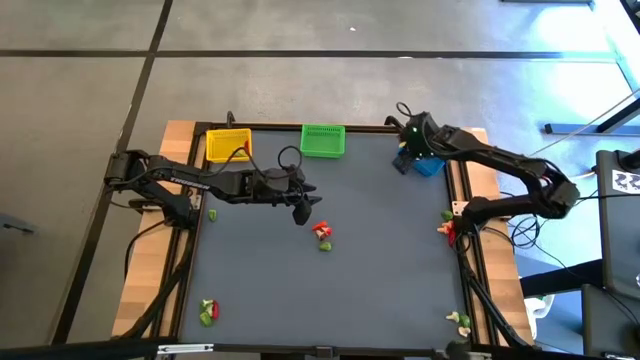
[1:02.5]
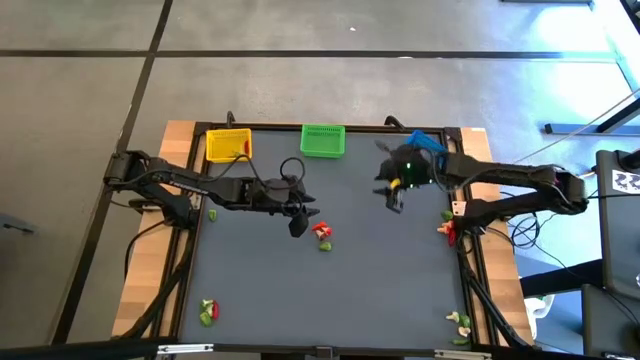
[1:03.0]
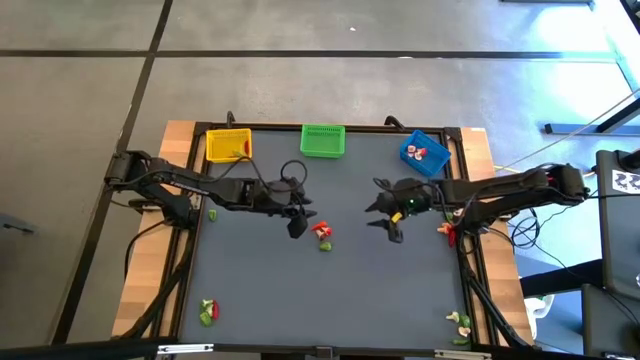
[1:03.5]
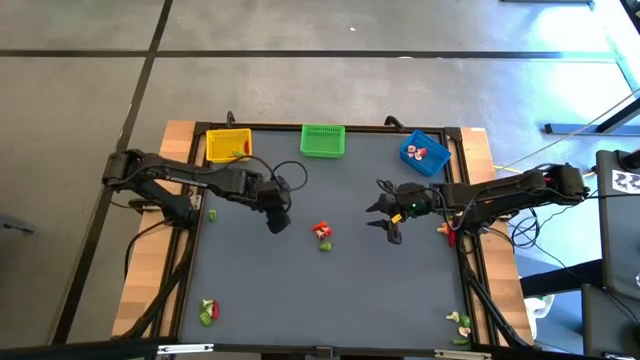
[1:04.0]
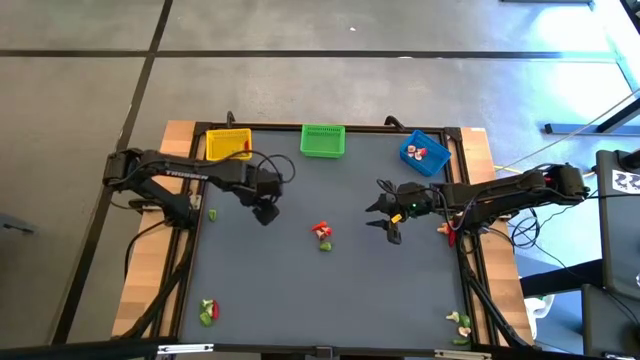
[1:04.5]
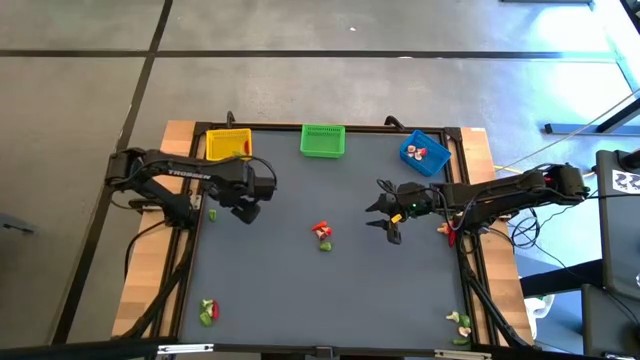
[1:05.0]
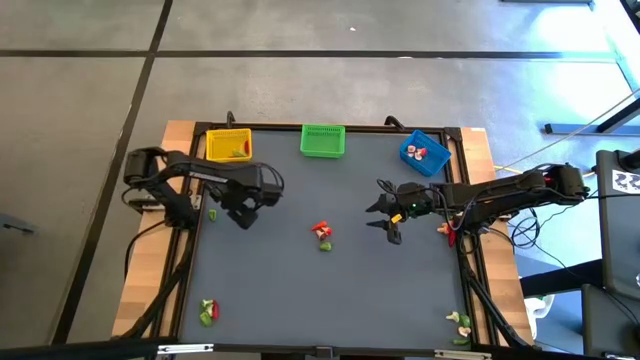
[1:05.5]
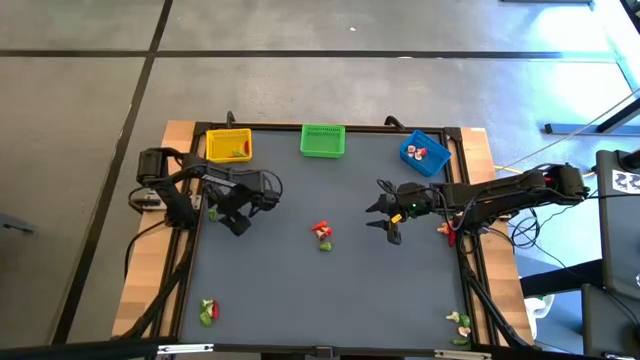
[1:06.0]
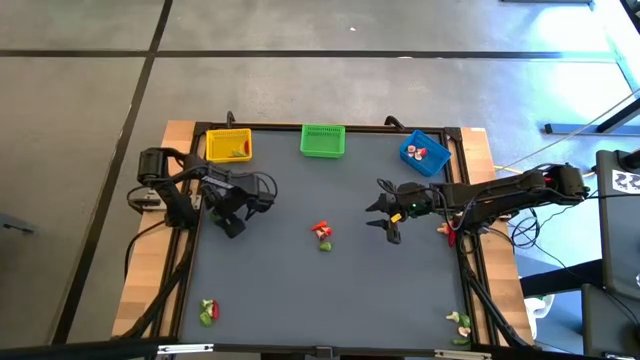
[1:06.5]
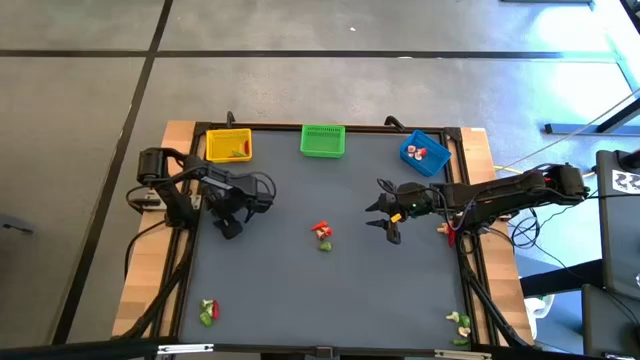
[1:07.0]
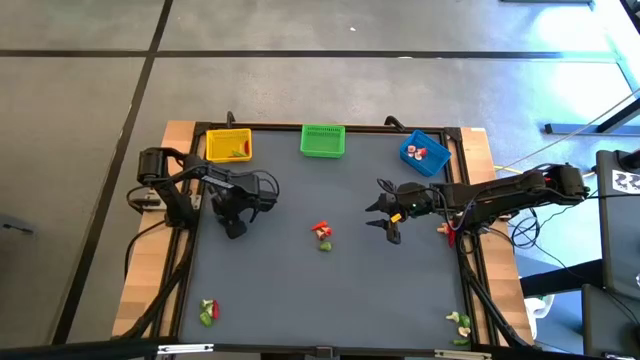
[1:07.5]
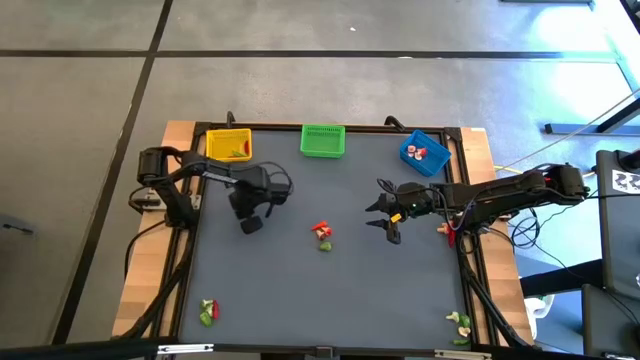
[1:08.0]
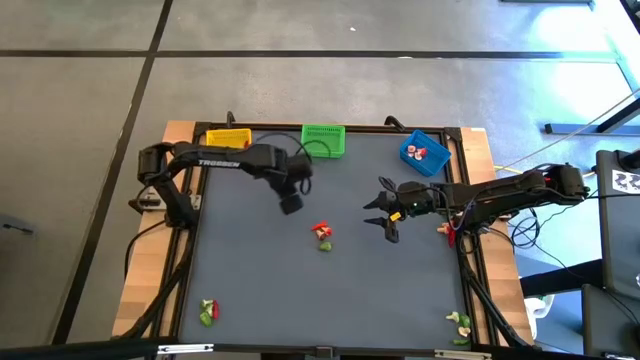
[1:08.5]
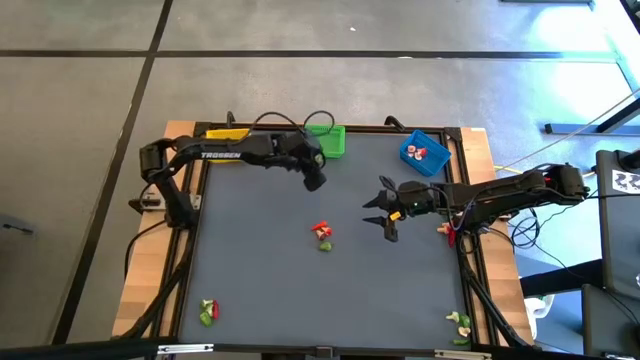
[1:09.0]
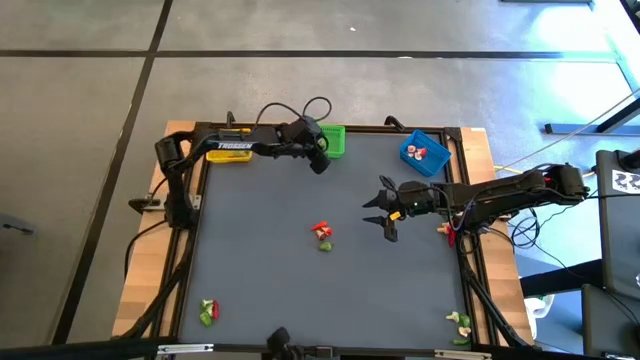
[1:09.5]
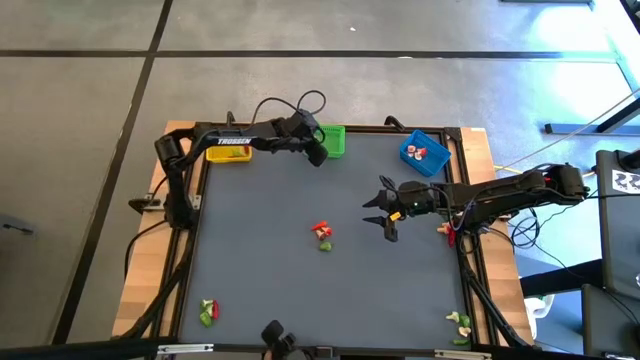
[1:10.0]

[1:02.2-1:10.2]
Task: Sort produce into baskets
Put the small green chili pepper into the green basket

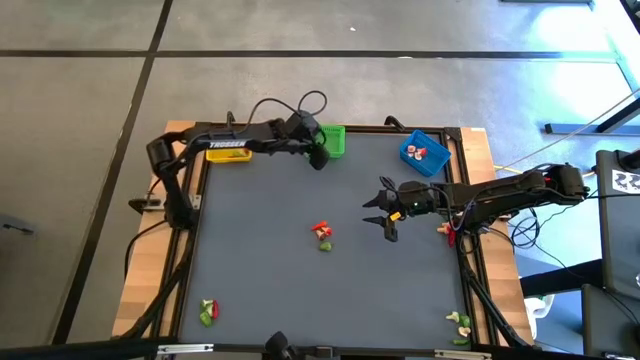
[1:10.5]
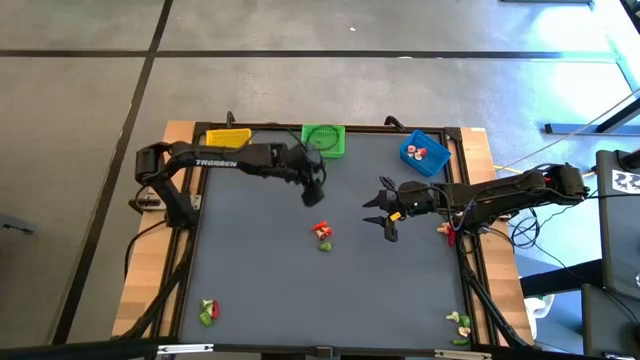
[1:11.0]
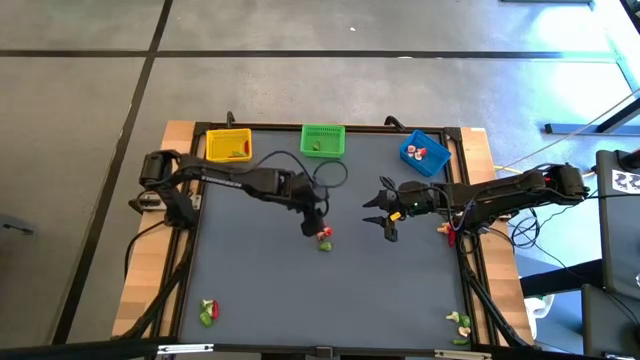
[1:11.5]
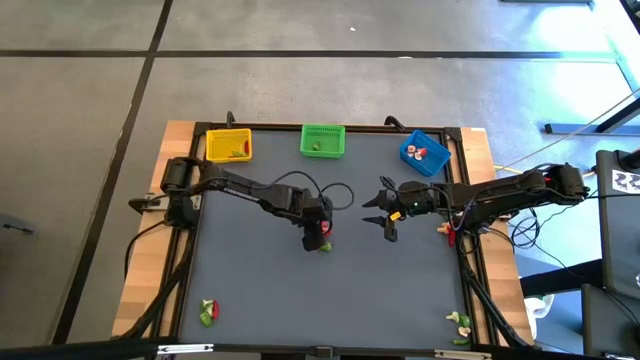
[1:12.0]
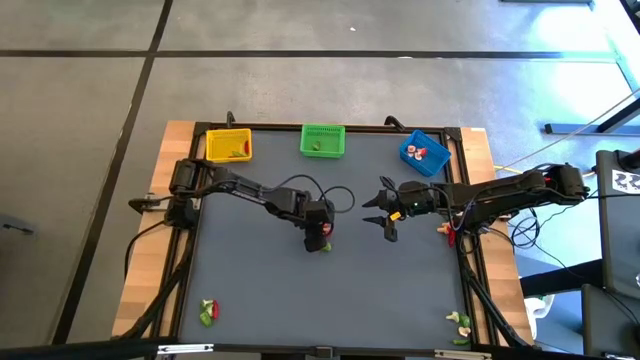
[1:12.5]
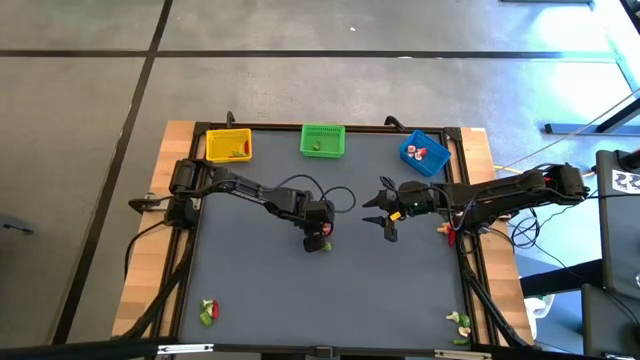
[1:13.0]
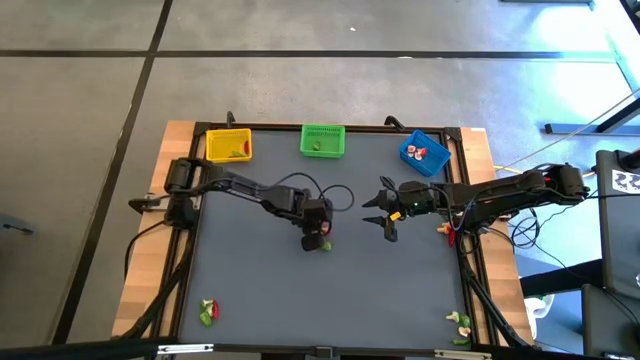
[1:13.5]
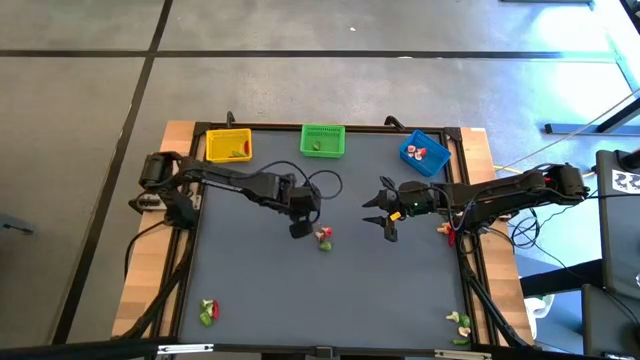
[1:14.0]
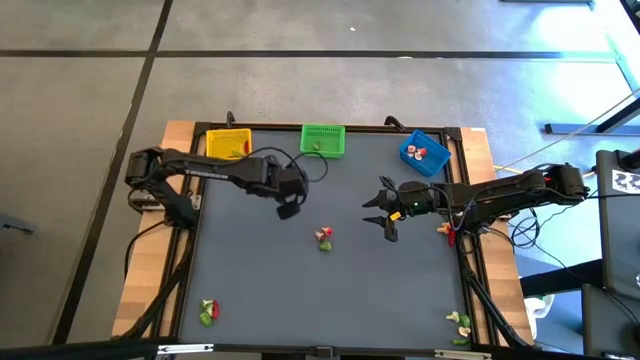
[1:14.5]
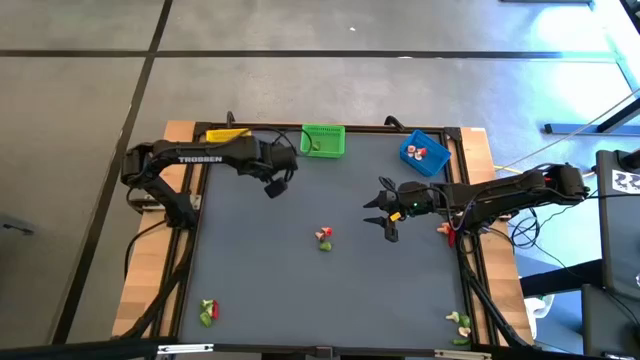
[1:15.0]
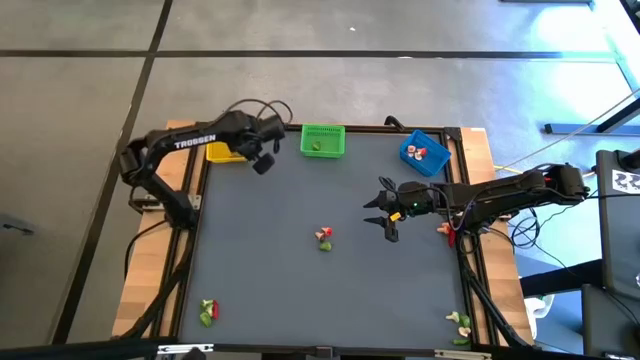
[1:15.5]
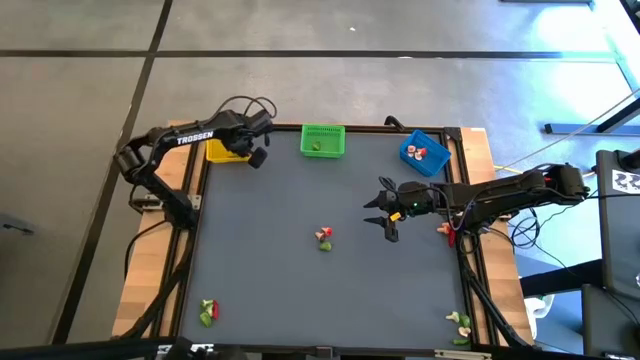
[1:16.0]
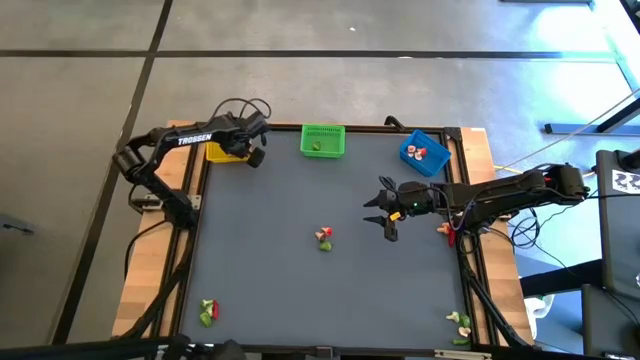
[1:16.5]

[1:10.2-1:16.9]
Put the red chili pepper into the yellow basket

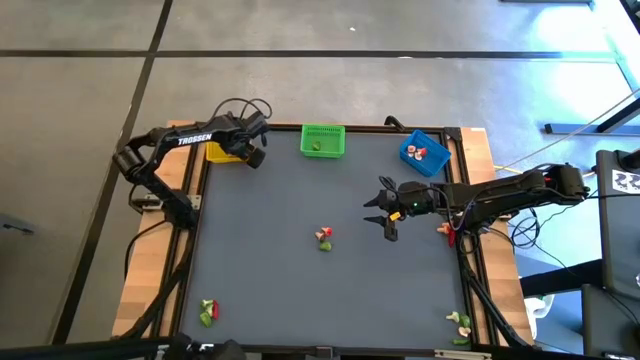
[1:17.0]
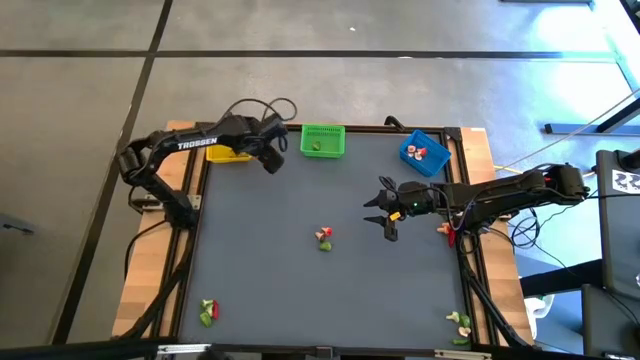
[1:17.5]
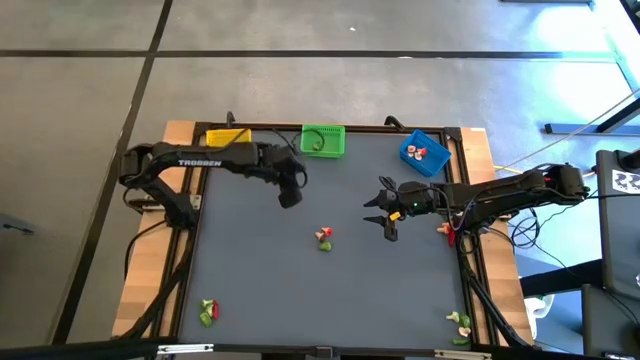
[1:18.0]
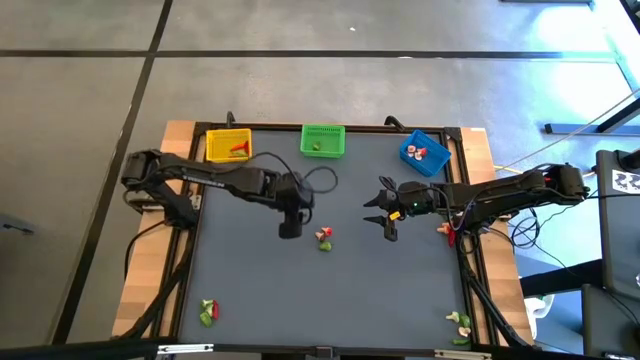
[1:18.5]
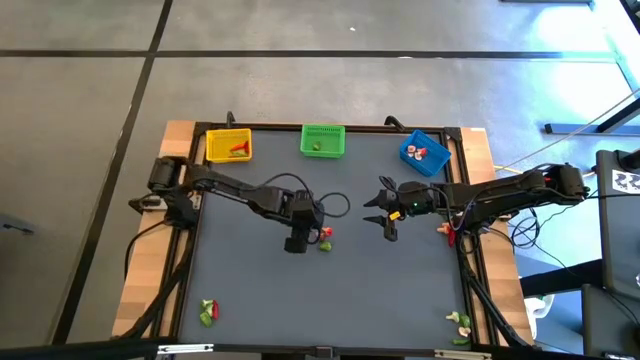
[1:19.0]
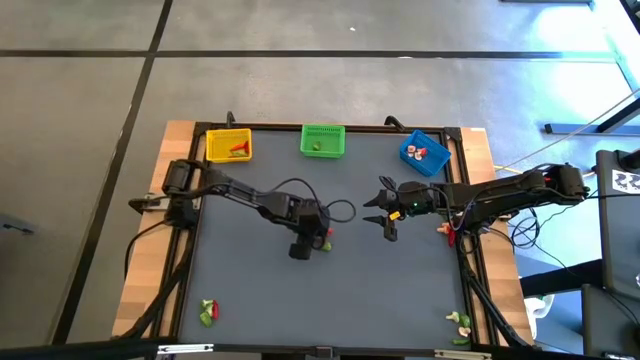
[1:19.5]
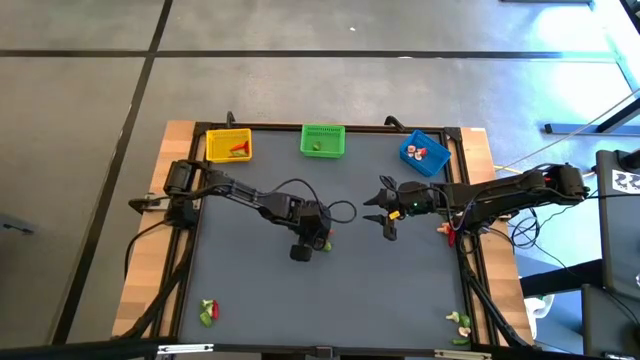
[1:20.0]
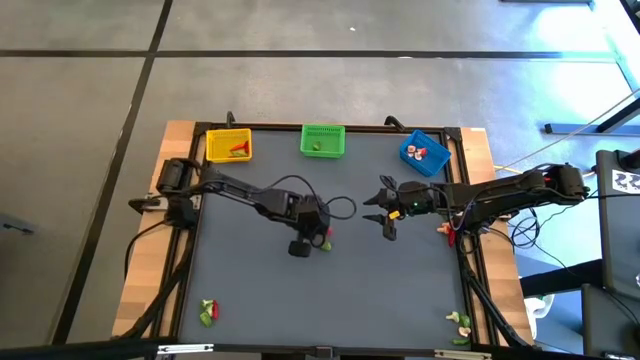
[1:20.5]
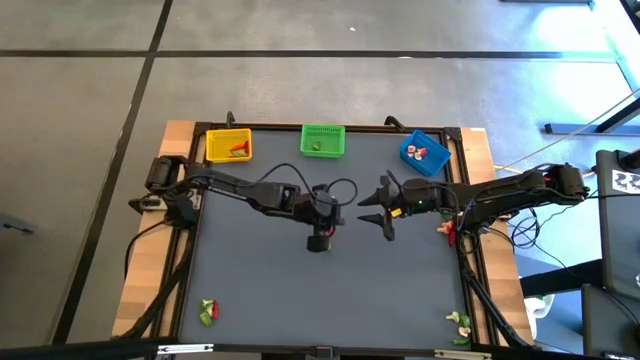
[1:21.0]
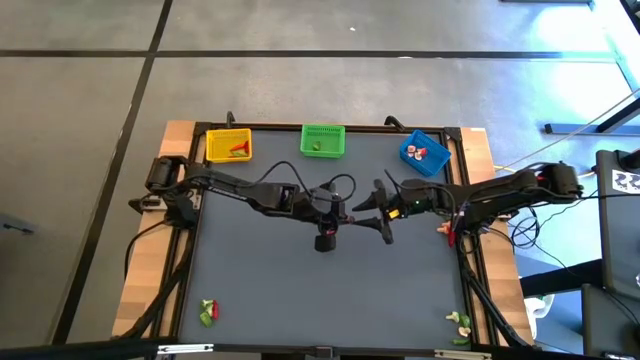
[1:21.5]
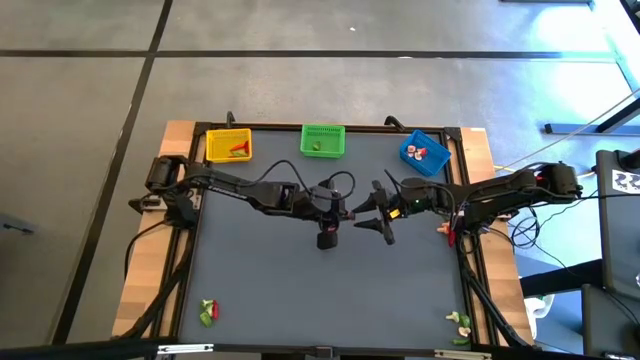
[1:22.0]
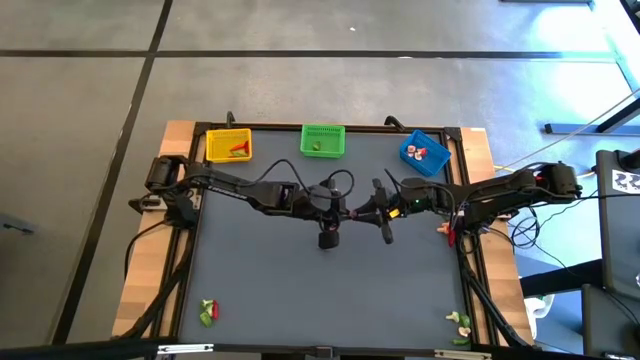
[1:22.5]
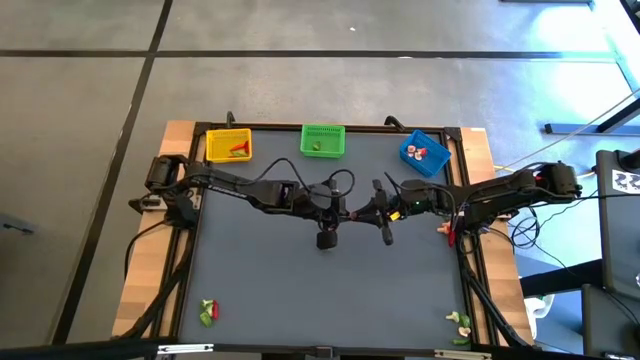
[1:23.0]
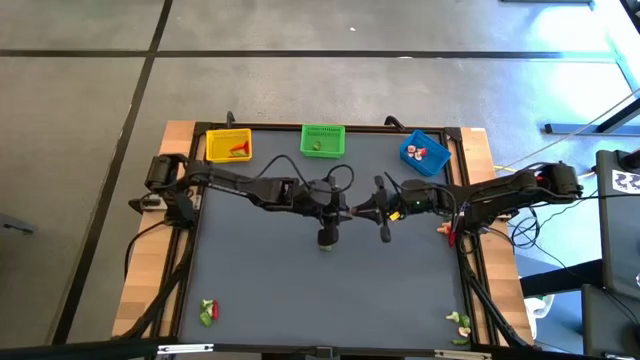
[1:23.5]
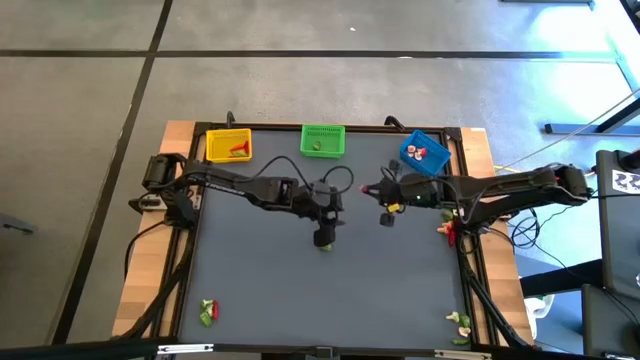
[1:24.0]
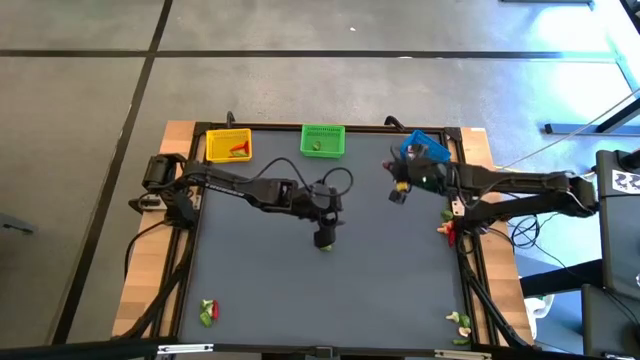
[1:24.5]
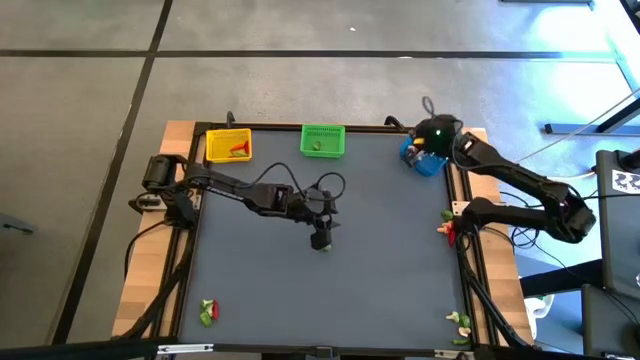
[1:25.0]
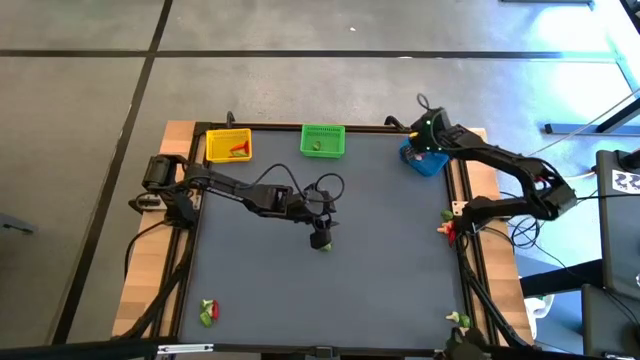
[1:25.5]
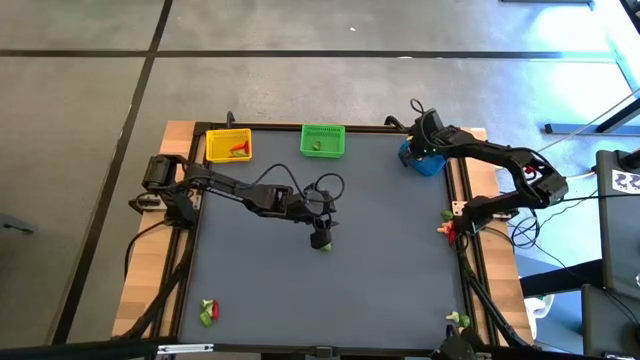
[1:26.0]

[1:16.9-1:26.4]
Put the brown mushroom into the blue basket
